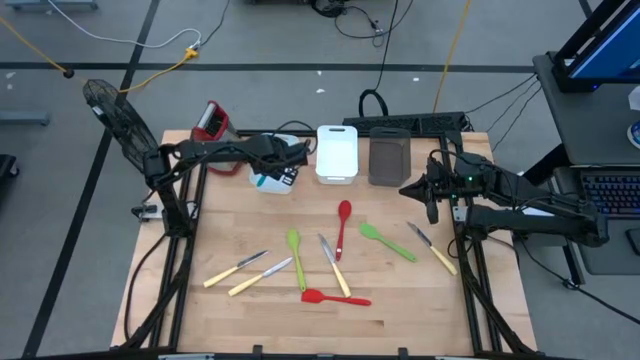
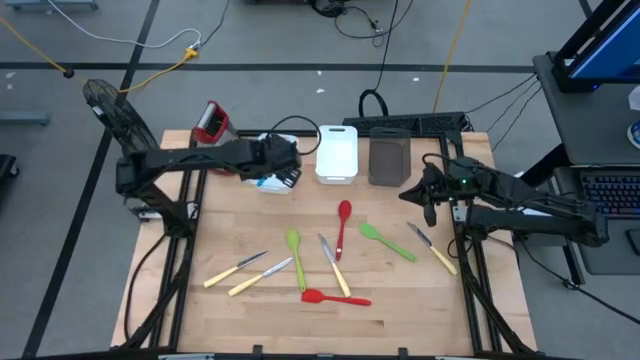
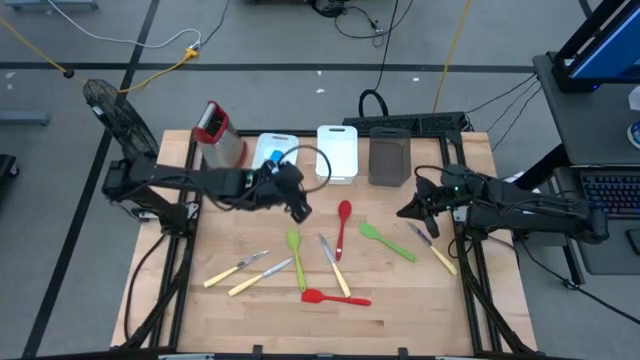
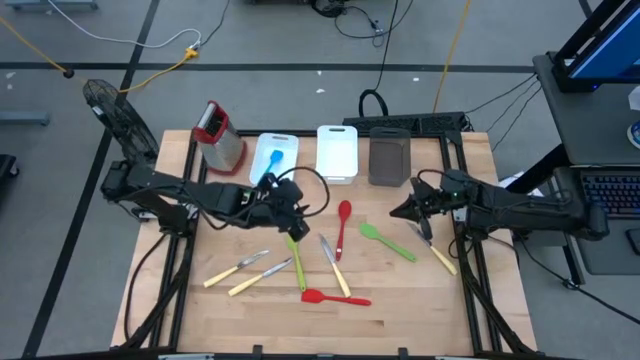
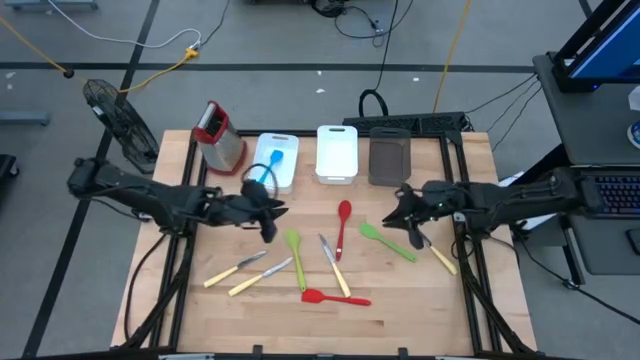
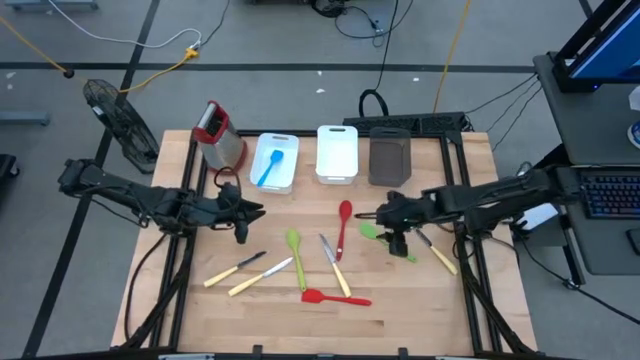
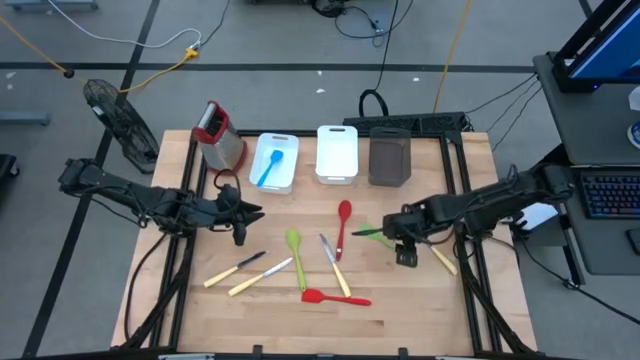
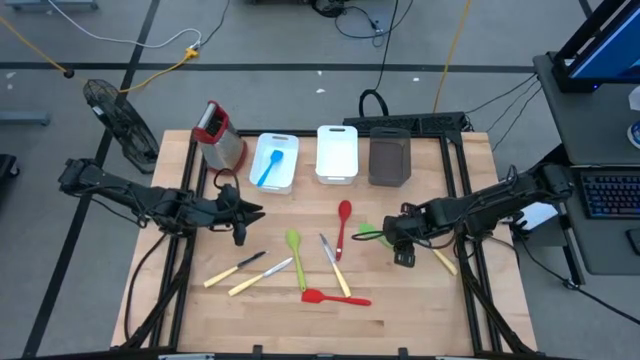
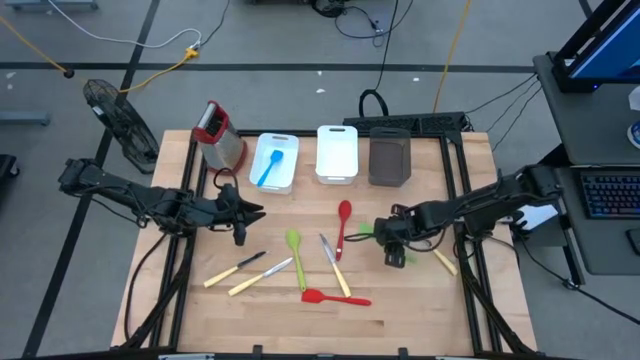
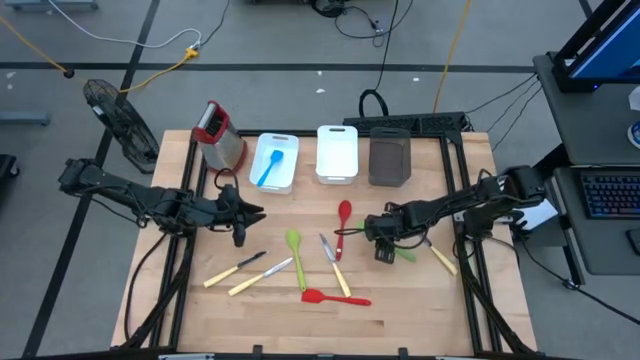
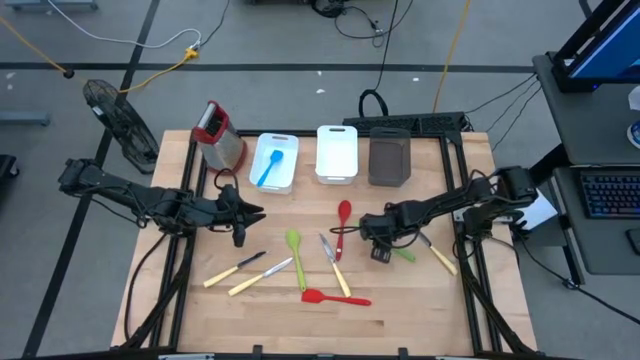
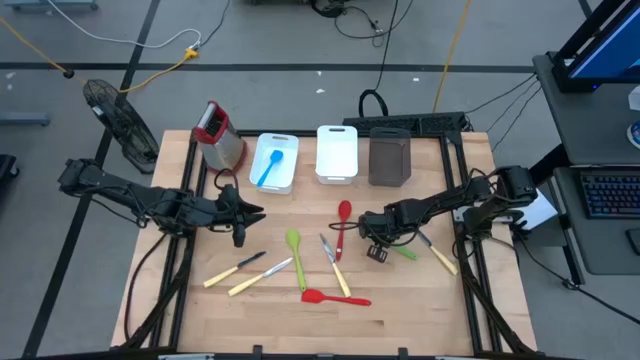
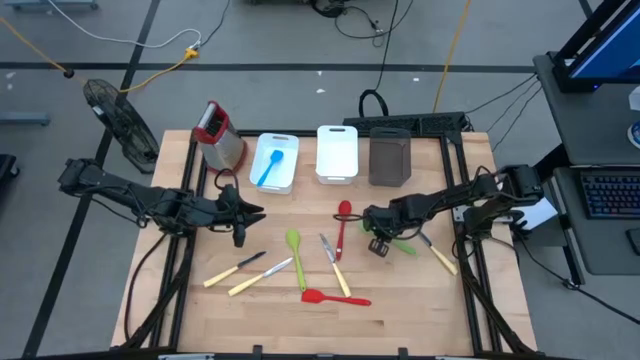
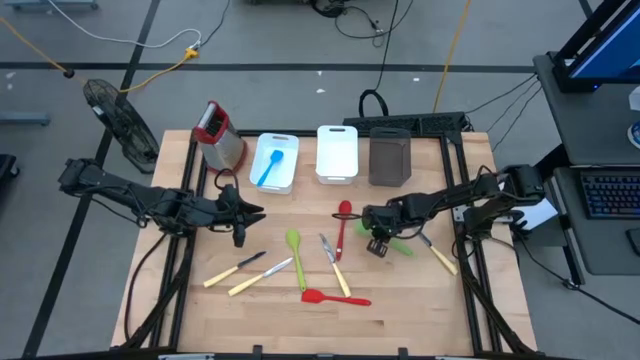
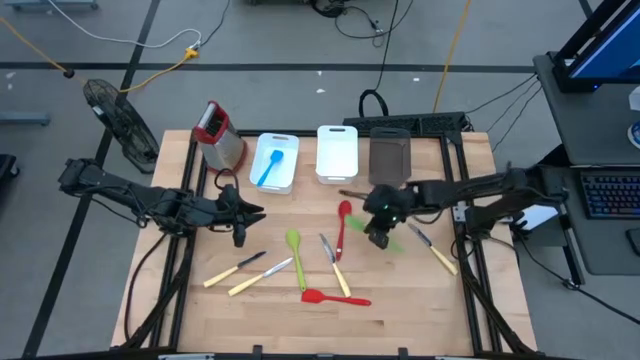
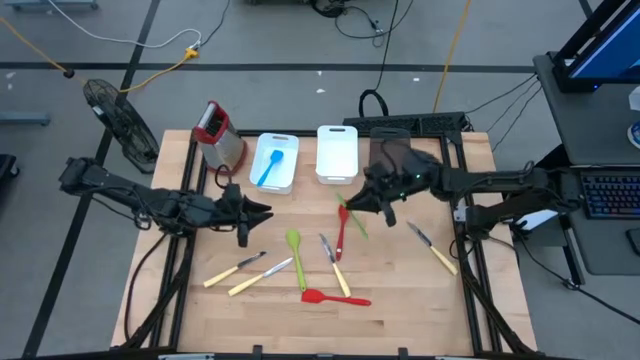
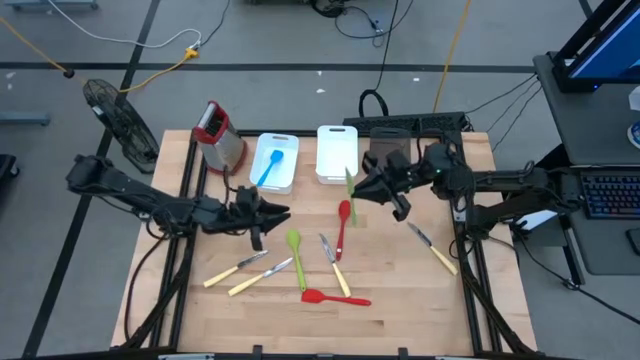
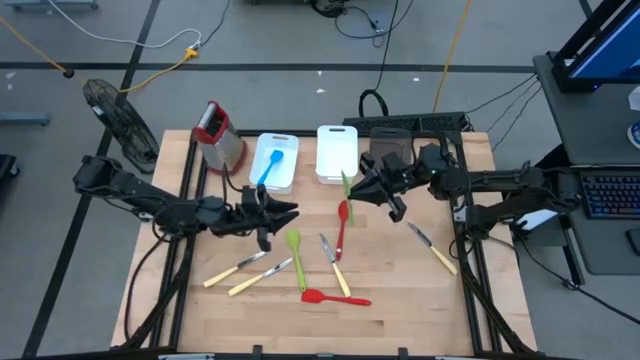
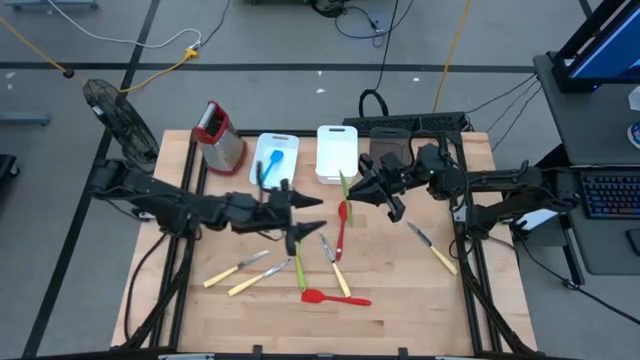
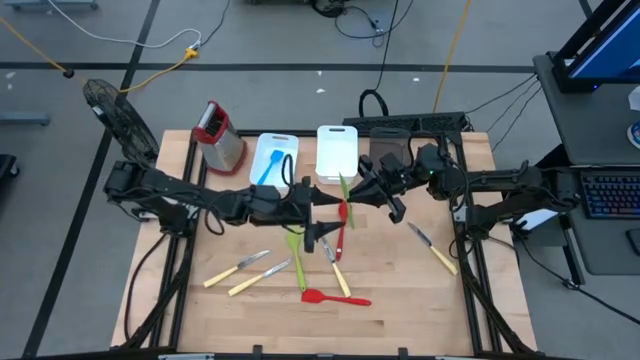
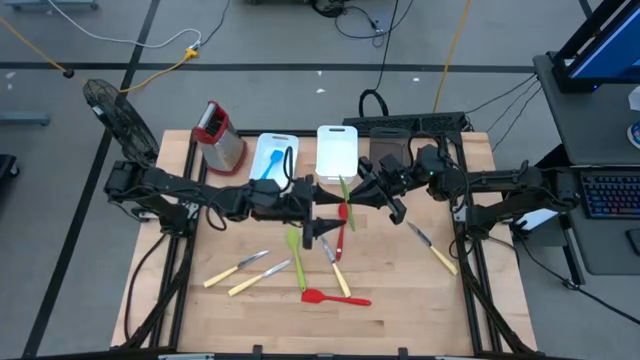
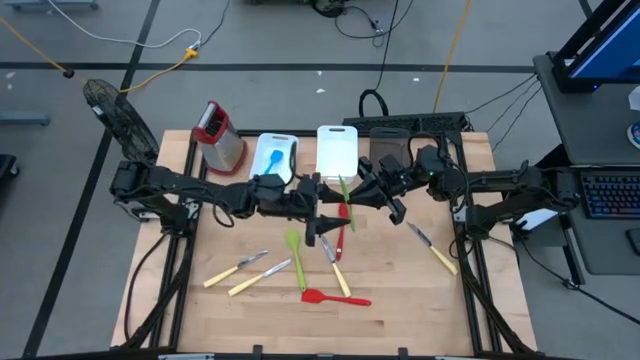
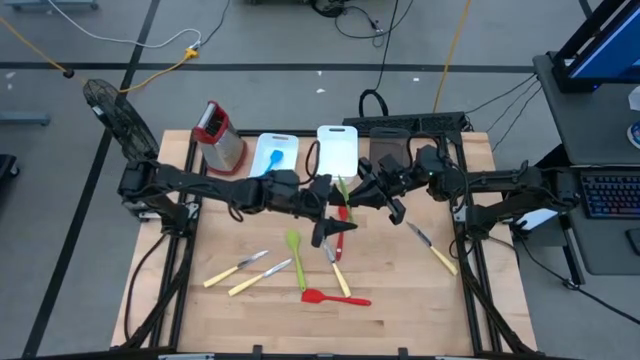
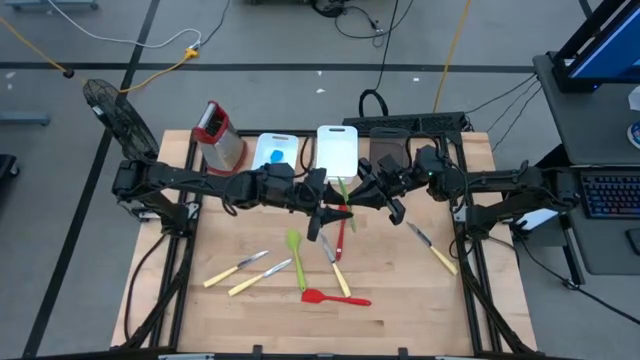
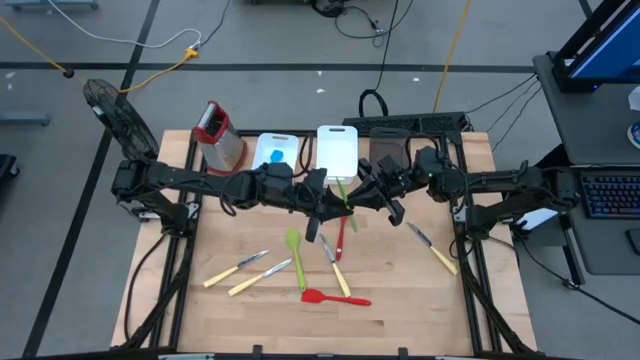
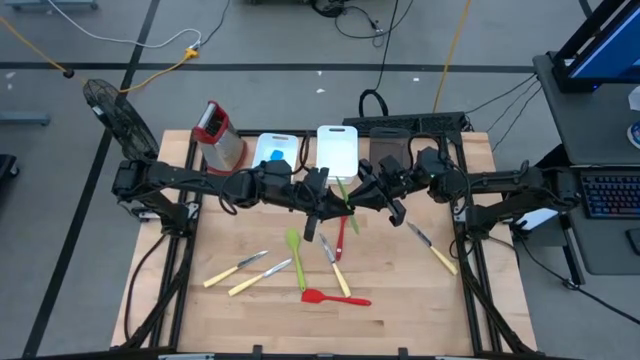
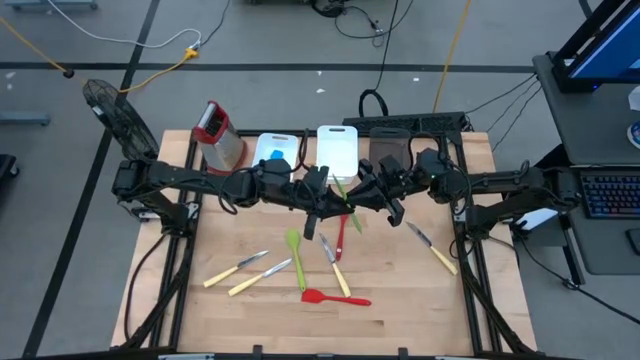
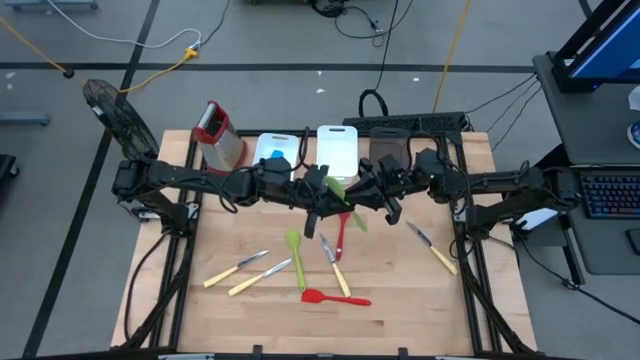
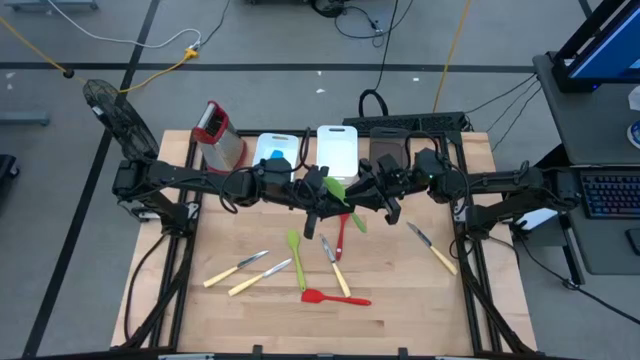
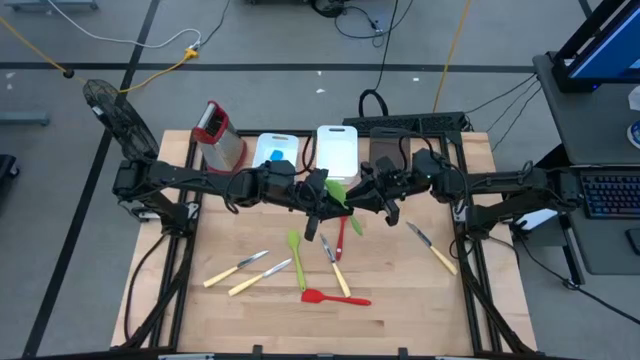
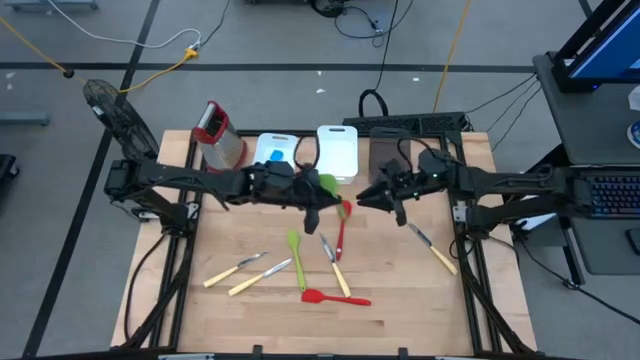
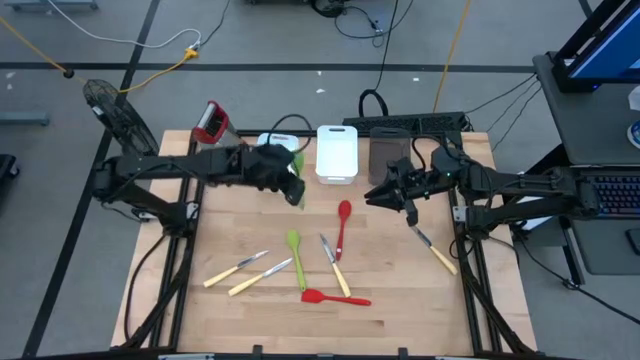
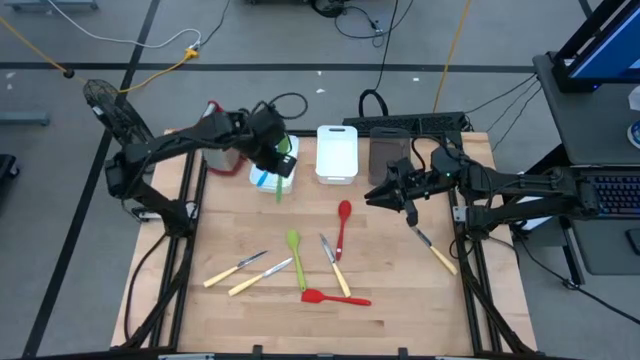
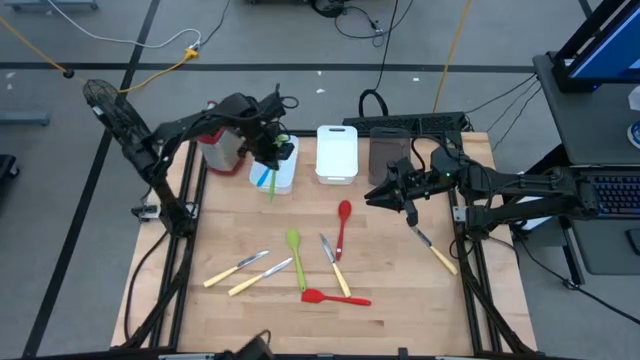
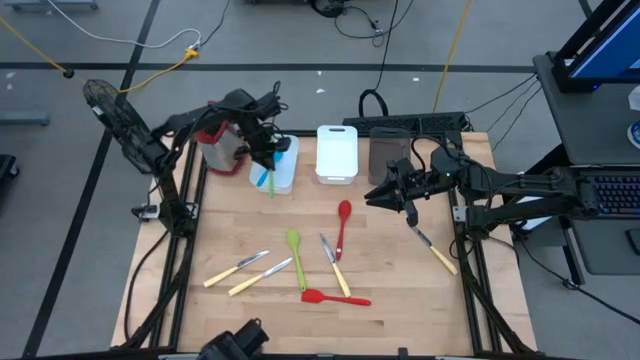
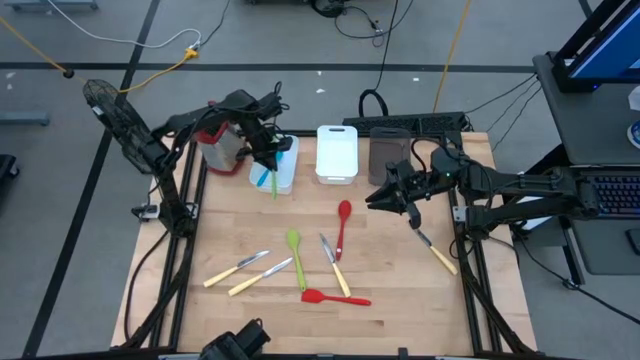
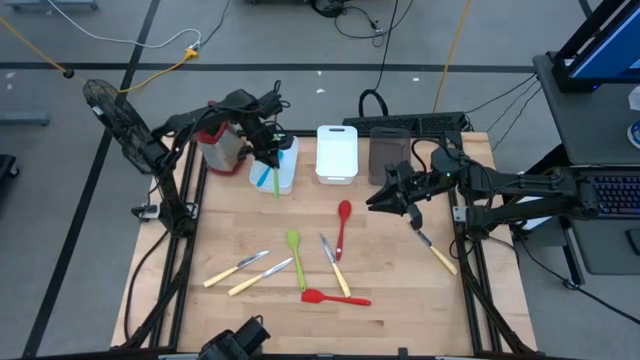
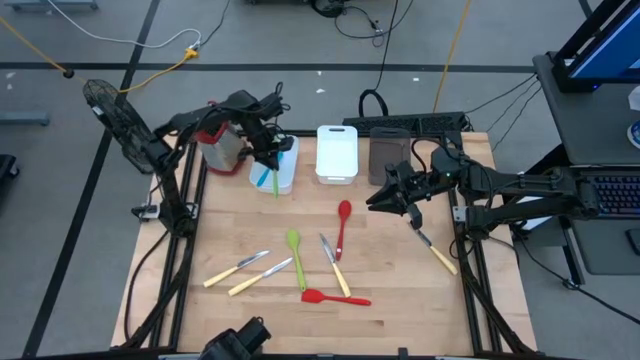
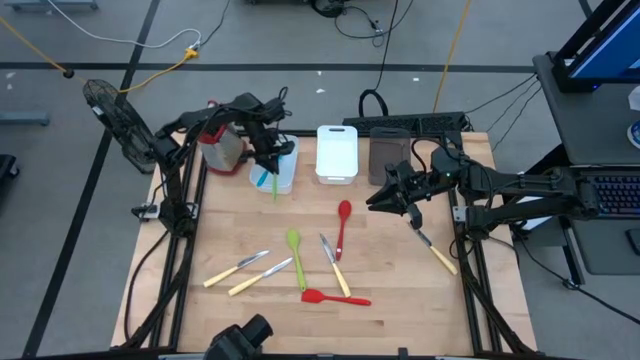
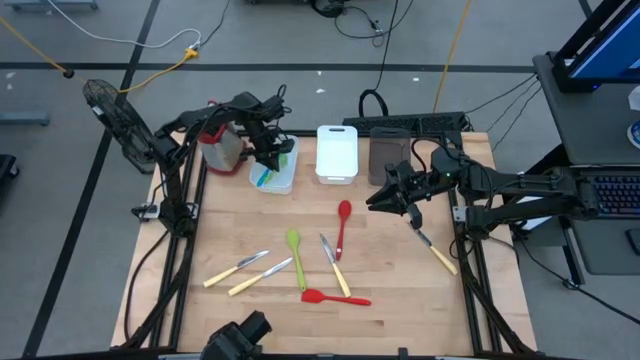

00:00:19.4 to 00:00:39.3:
Task: Pick & Place Kitchen Items
Put the green spatula into the left white bin

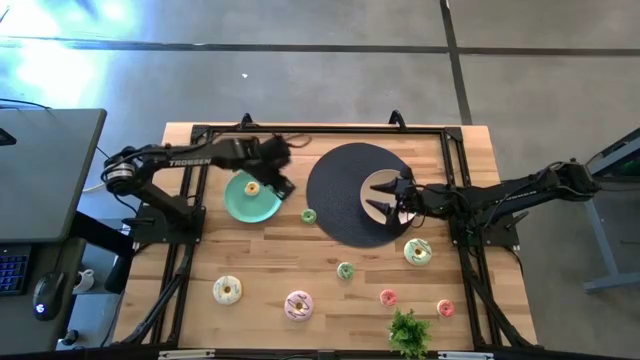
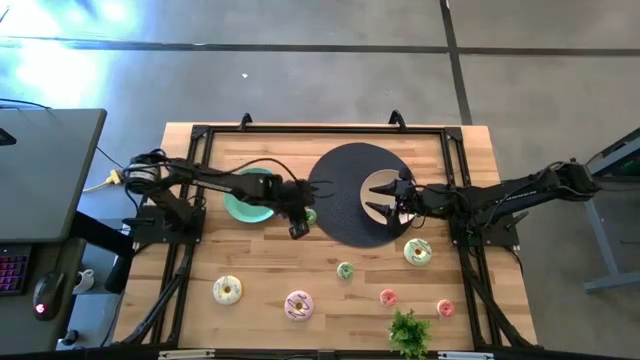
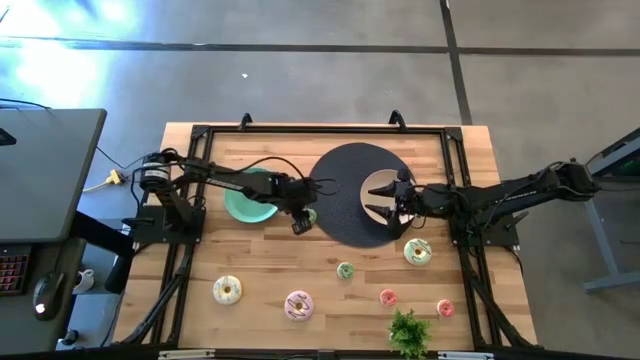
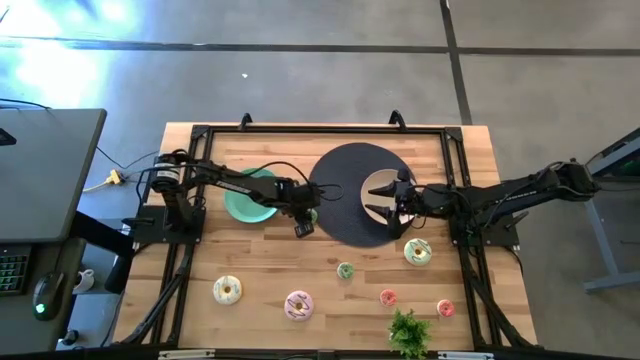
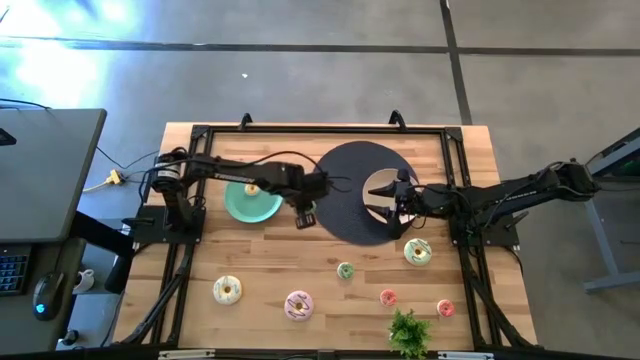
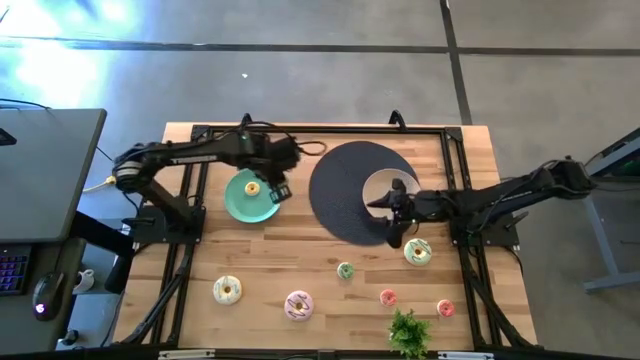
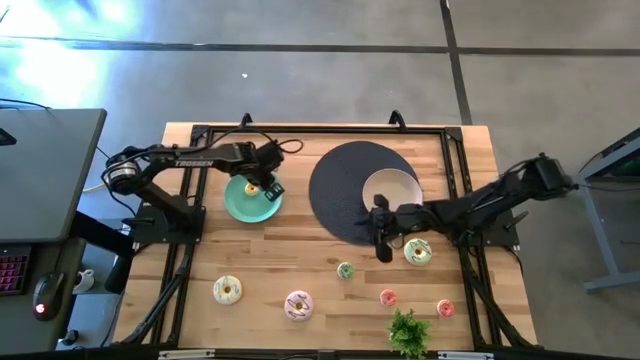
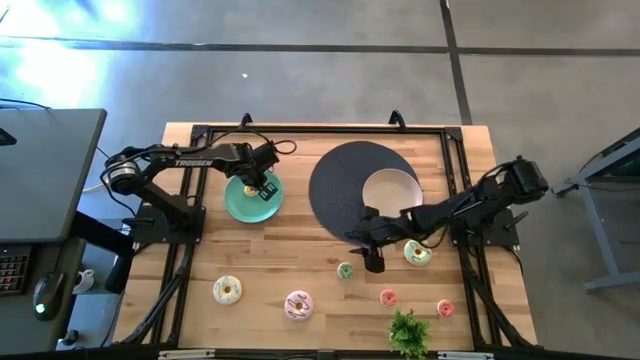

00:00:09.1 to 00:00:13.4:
Task: Pick & Place donuts
Put the top small green donut onto the blue plate
